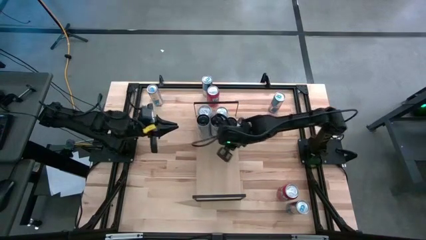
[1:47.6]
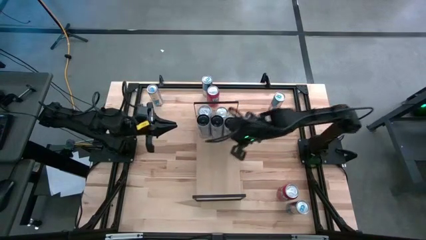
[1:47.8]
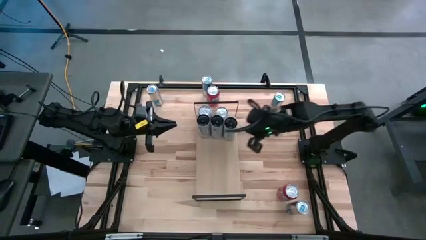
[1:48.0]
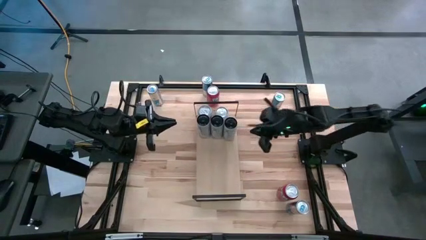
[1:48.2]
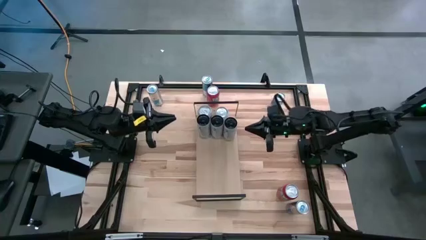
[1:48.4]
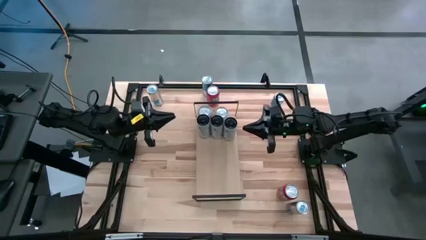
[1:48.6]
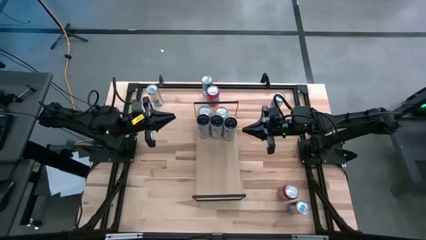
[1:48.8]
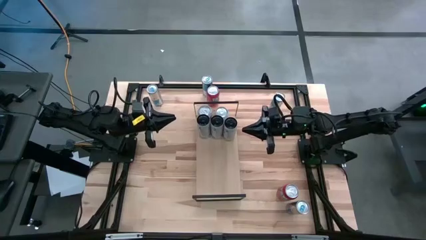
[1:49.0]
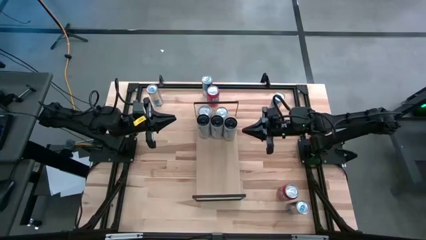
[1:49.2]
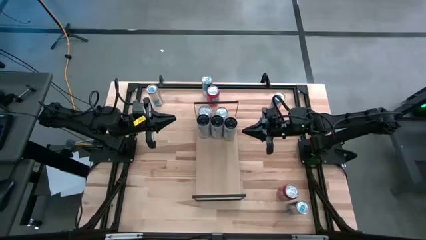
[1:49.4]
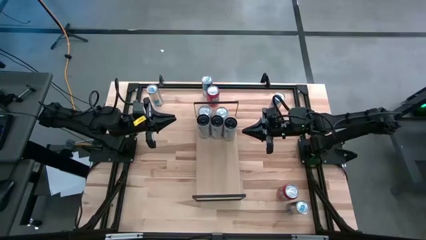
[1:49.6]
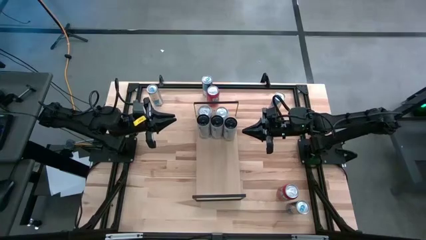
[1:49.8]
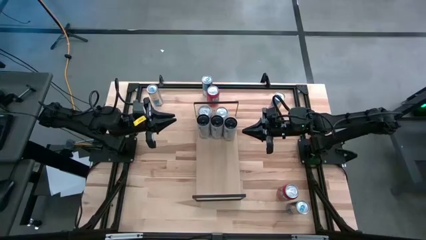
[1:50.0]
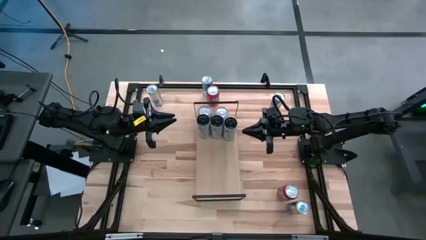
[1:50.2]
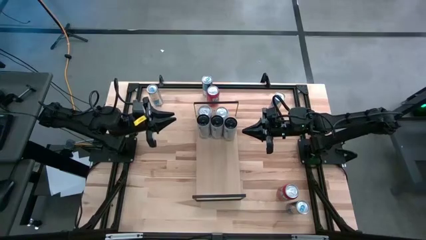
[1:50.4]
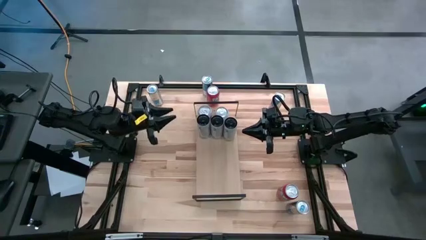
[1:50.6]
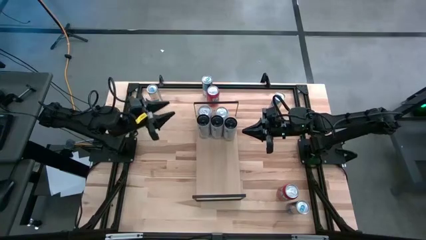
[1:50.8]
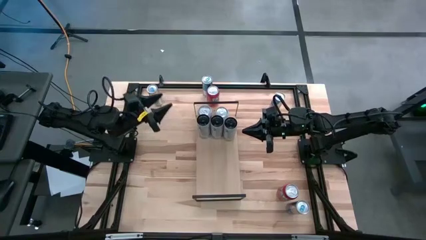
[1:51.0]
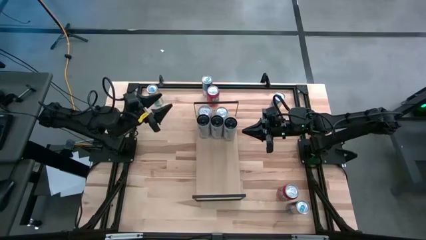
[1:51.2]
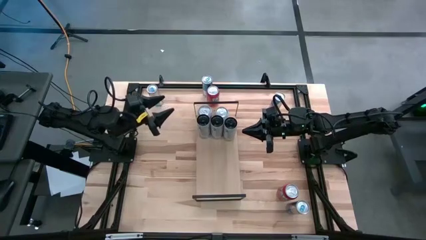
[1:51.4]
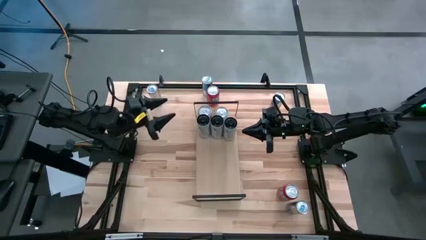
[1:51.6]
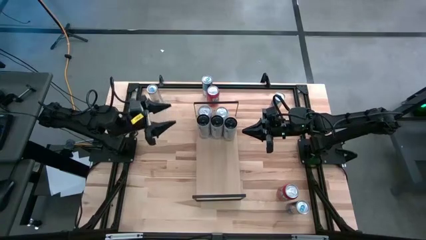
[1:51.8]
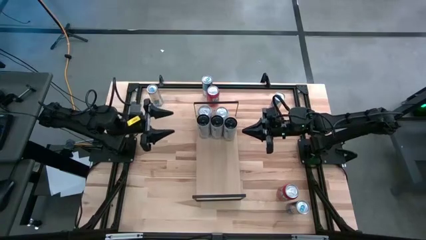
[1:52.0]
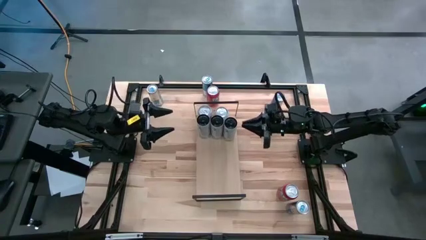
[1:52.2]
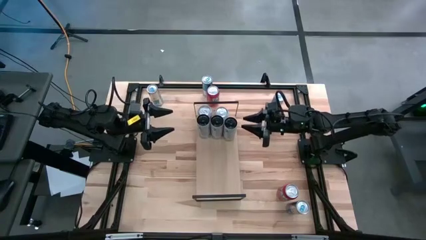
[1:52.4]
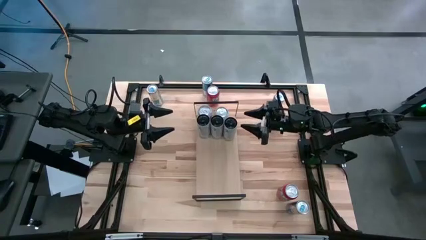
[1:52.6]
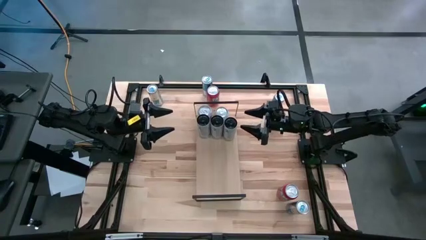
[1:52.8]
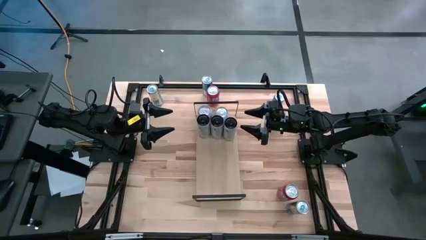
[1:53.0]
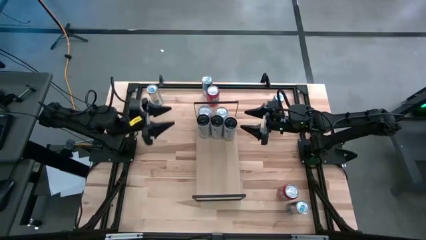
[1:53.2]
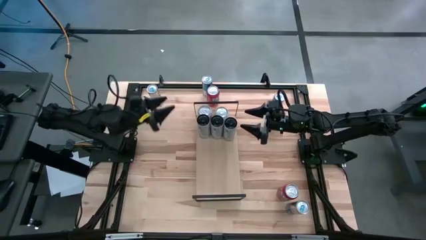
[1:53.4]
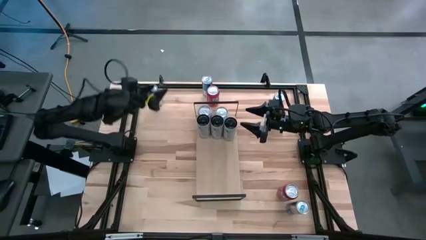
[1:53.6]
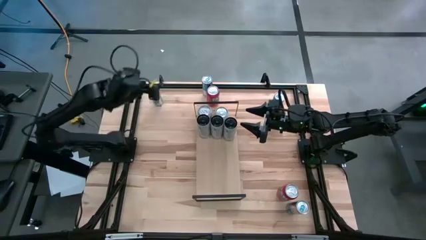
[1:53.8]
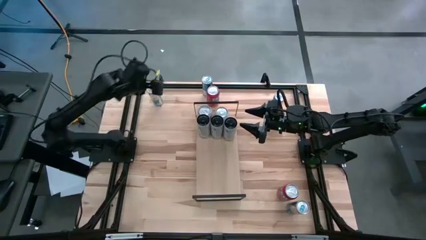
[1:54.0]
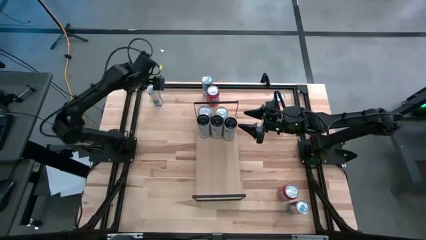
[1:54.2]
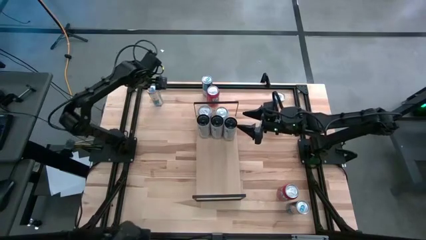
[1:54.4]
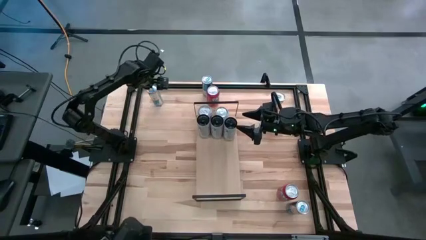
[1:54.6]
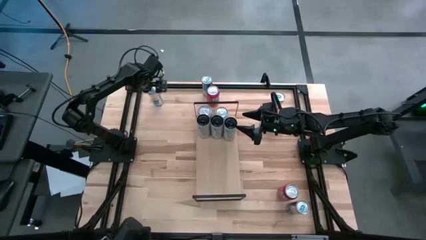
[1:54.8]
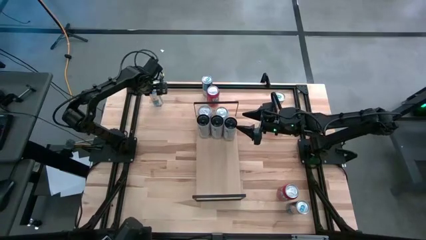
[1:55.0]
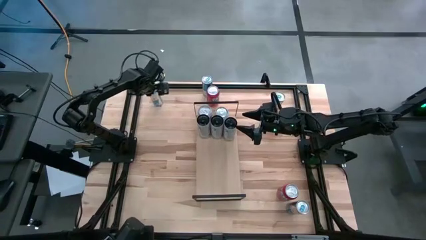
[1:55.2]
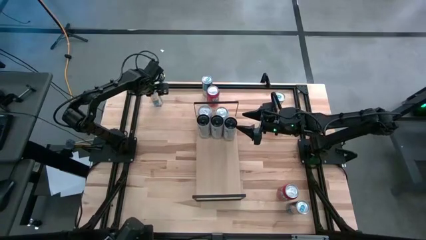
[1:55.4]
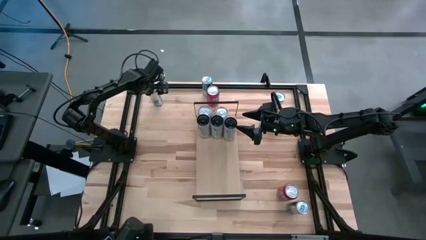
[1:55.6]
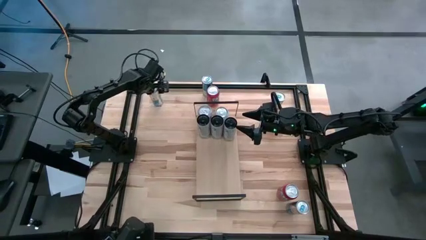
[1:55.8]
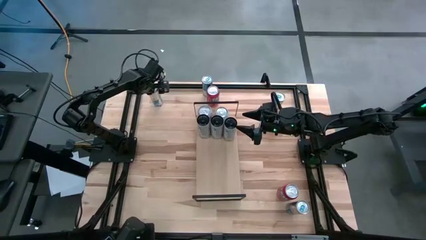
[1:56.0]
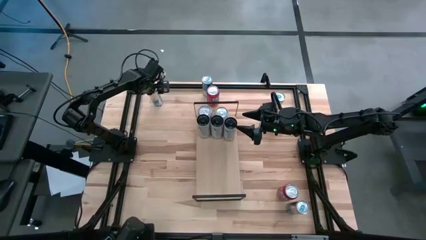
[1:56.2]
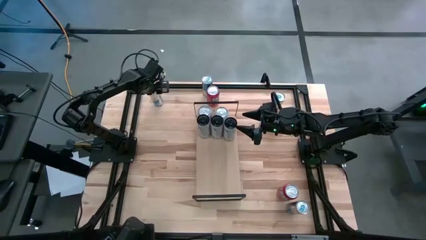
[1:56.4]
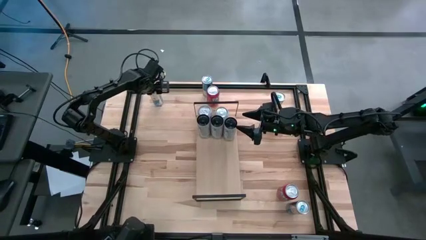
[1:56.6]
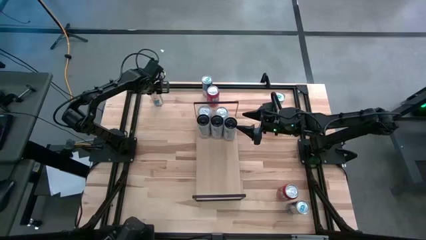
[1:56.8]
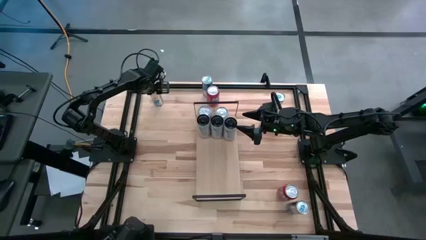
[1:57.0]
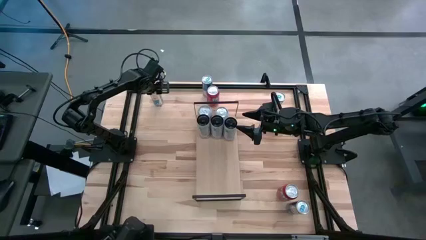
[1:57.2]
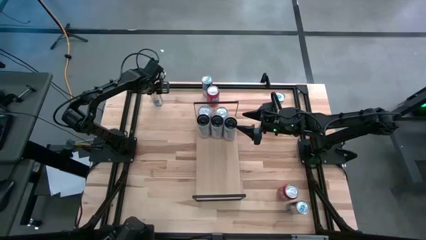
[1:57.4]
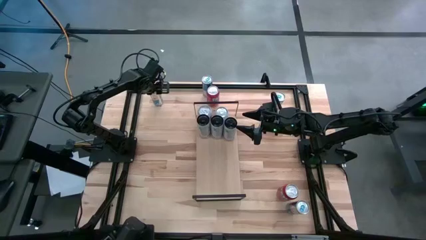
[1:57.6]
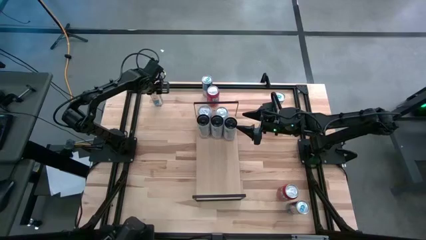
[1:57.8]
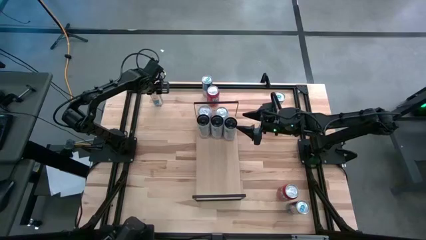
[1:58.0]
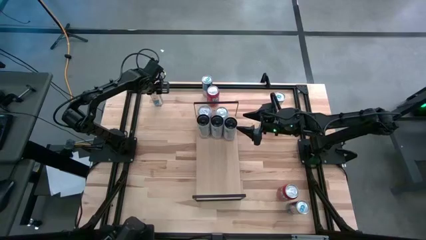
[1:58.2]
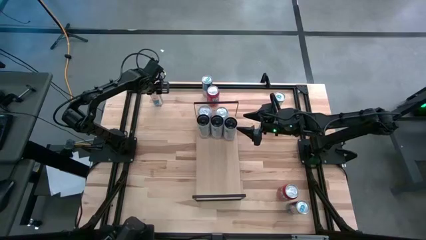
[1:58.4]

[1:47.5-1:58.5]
Task: Place canned beverage on shelf
Put the left blue soda can on the shelf

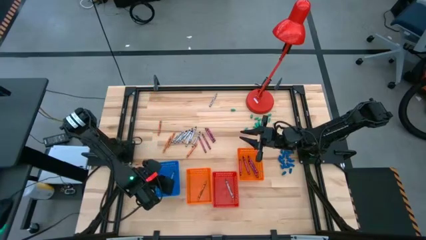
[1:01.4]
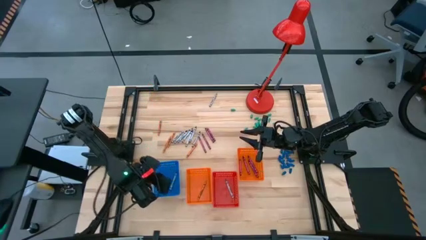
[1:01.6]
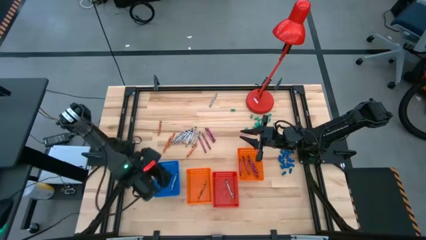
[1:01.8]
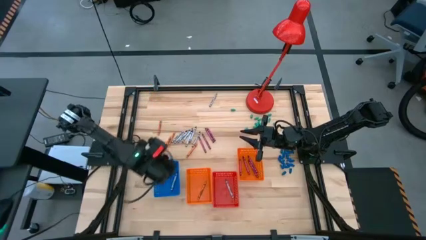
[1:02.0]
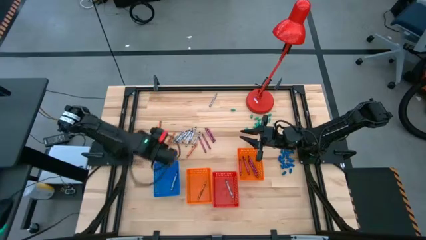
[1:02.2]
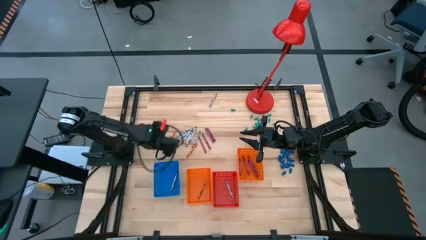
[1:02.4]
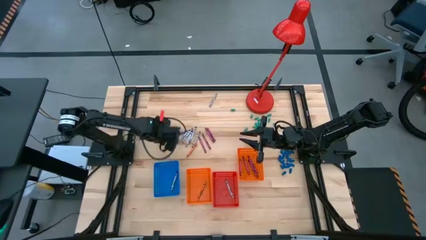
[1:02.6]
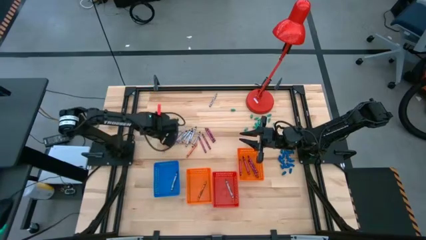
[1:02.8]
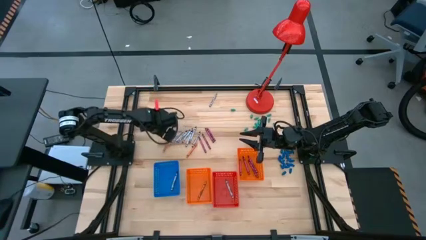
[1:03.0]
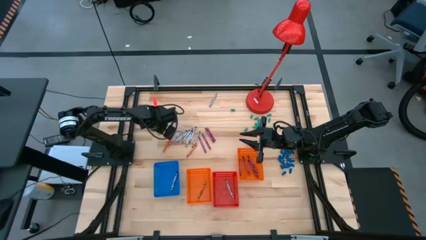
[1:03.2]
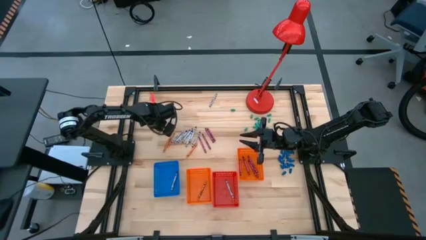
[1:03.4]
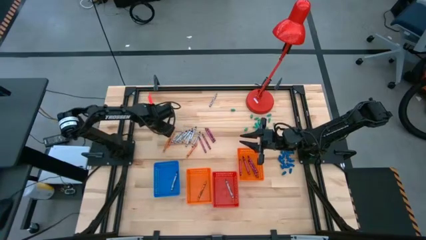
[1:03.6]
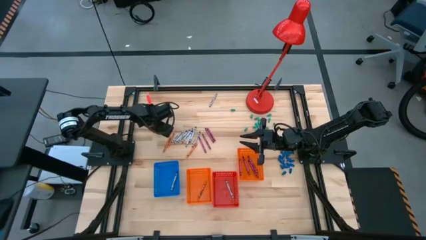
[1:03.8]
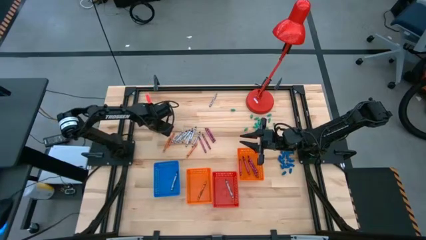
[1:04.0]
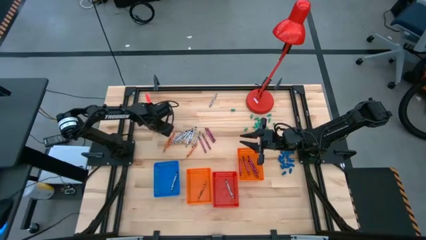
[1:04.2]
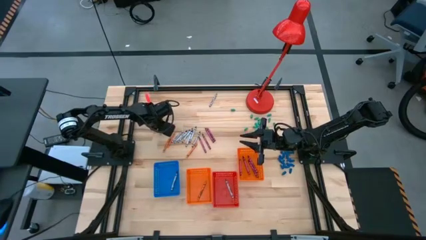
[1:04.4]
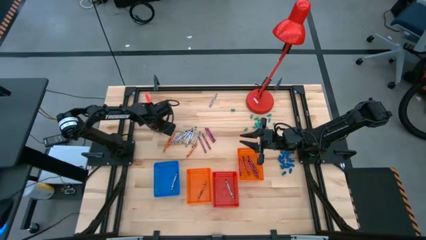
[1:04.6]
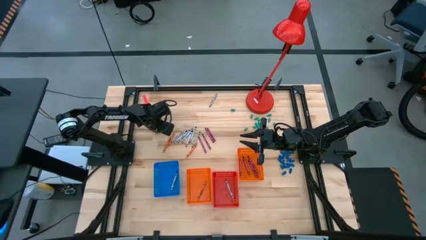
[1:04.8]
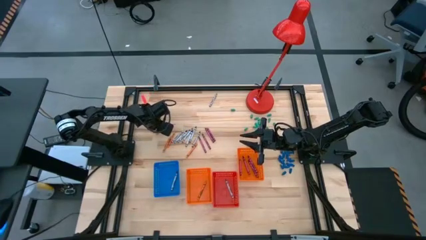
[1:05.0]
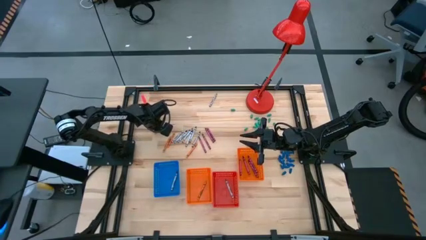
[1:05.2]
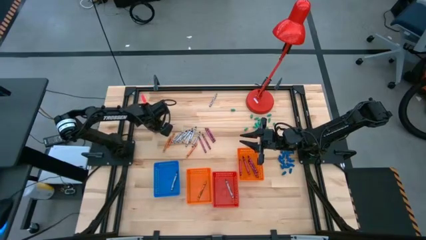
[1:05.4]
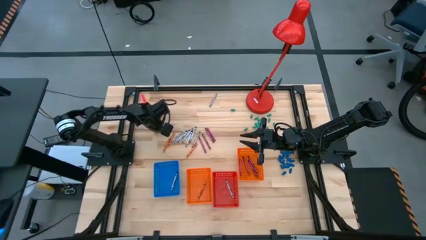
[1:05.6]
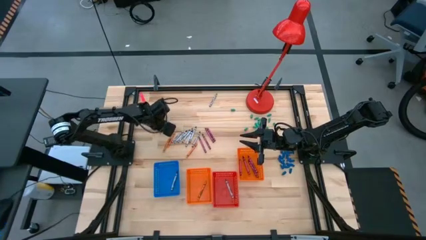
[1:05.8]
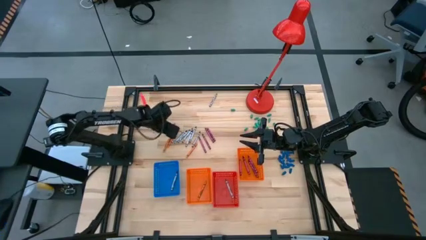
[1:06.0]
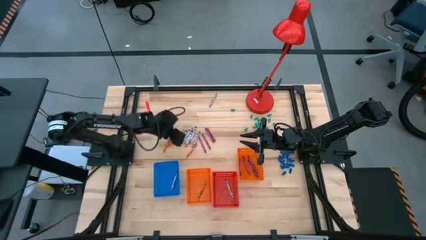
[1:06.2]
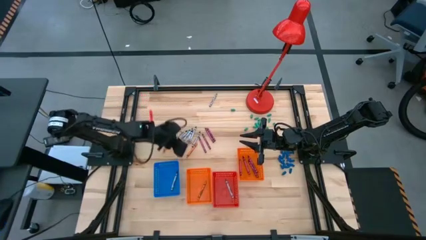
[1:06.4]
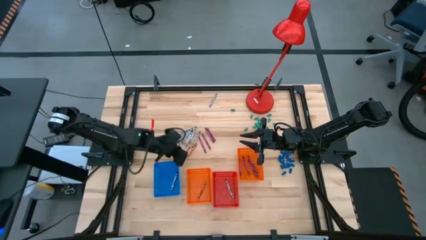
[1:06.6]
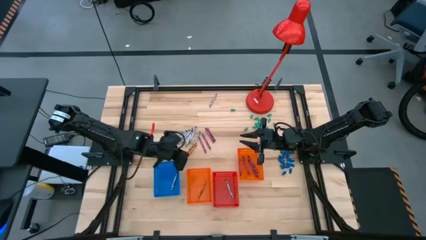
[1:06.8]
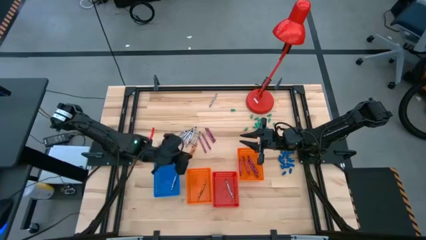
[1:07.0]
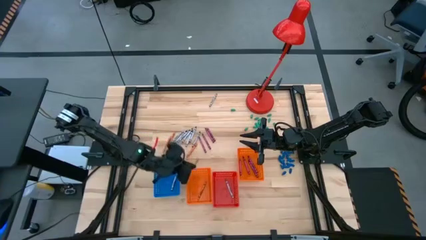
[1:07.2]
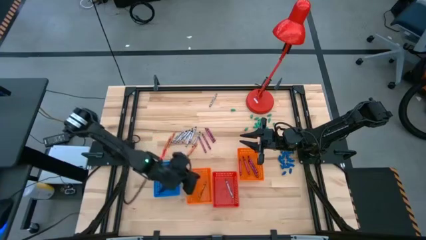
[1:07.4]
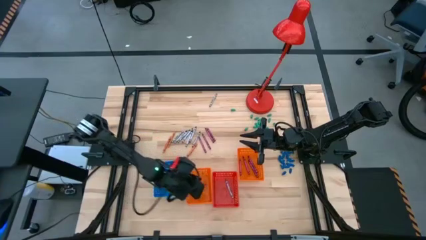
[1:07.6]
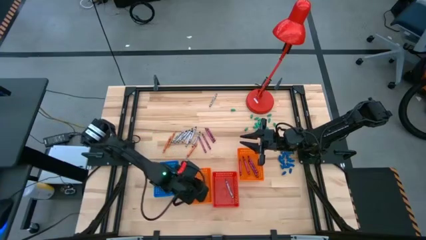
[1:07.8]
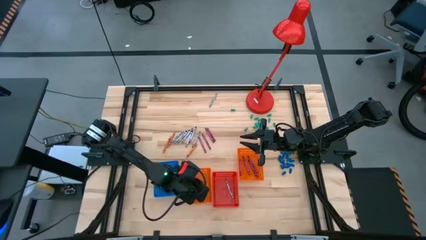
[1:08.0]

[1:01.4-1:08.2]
Task: Sort crayons
Put the orange crayon into the left orange bin
